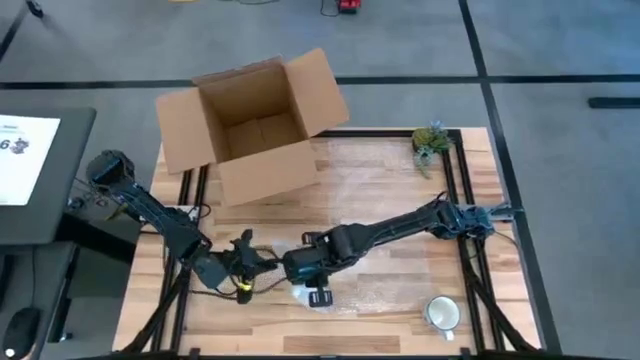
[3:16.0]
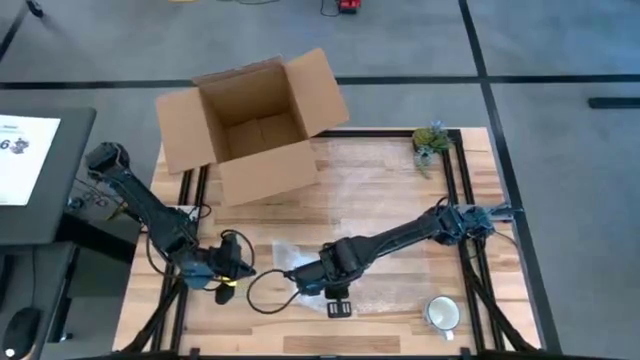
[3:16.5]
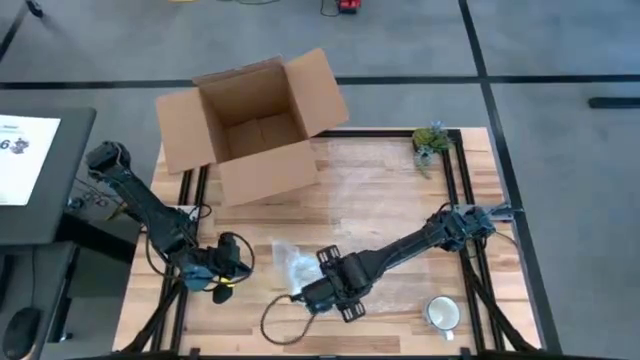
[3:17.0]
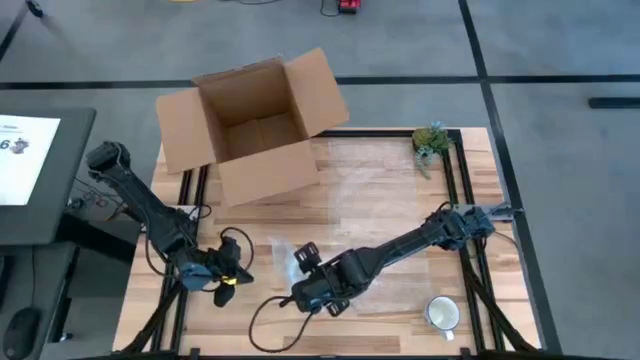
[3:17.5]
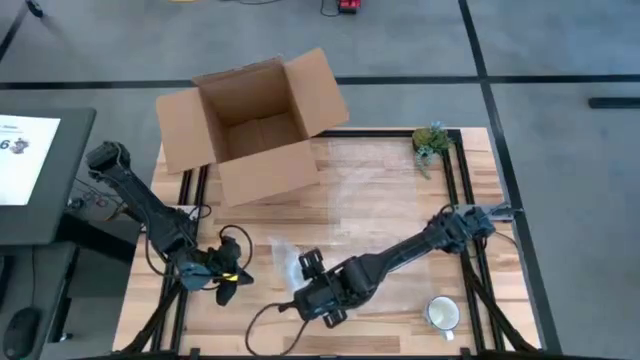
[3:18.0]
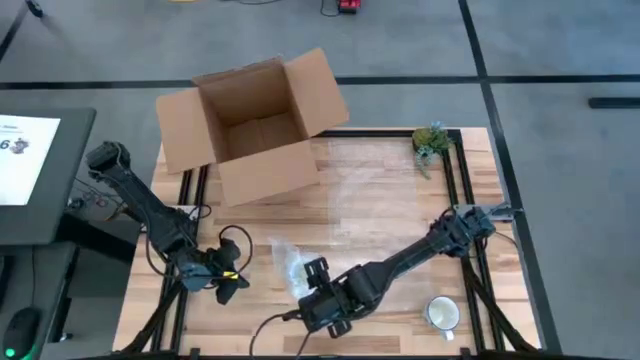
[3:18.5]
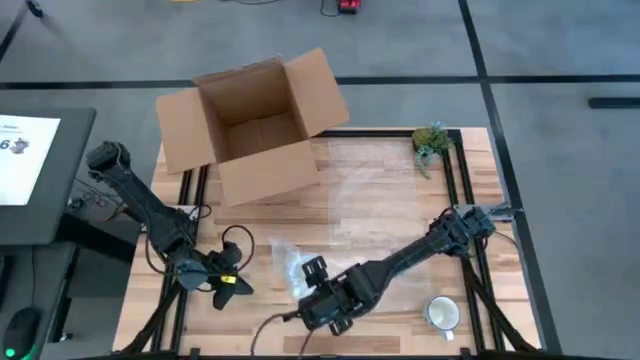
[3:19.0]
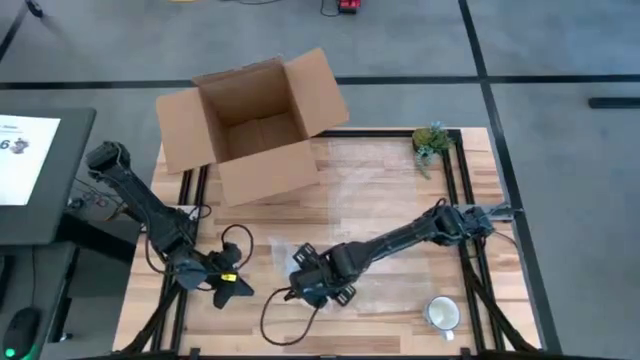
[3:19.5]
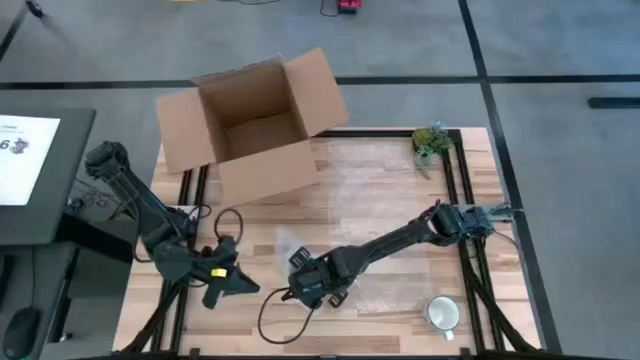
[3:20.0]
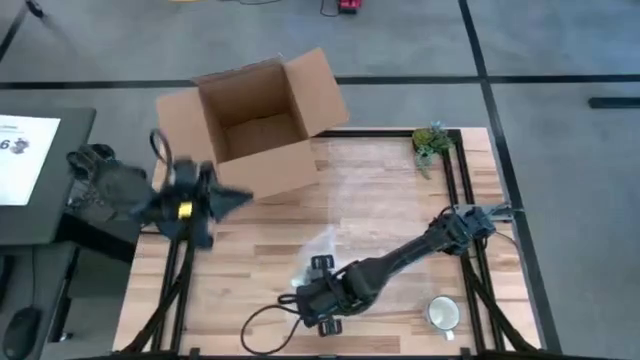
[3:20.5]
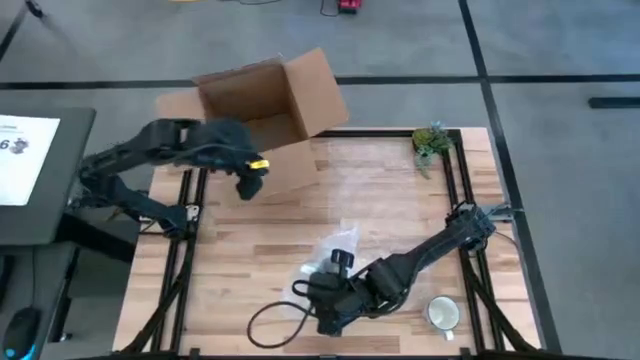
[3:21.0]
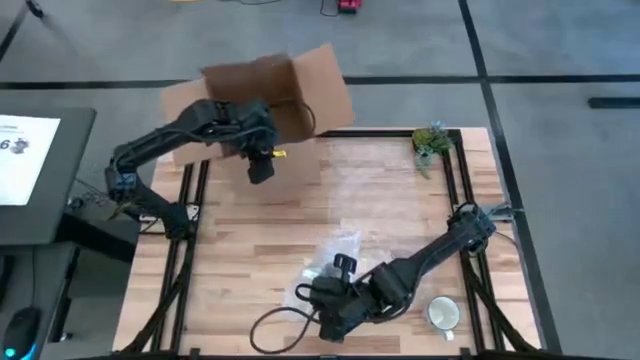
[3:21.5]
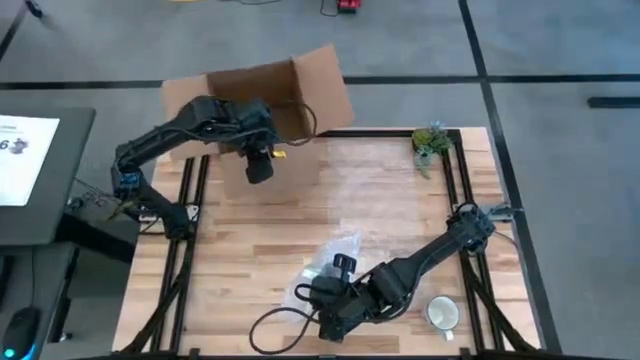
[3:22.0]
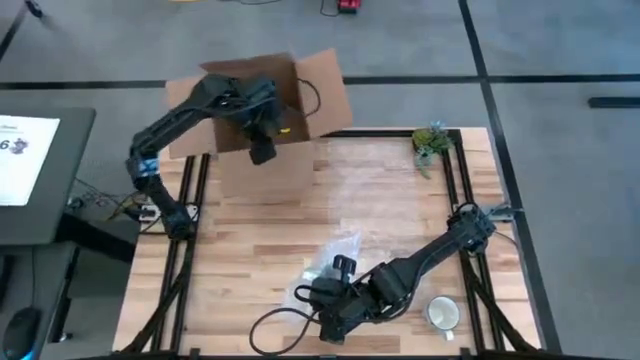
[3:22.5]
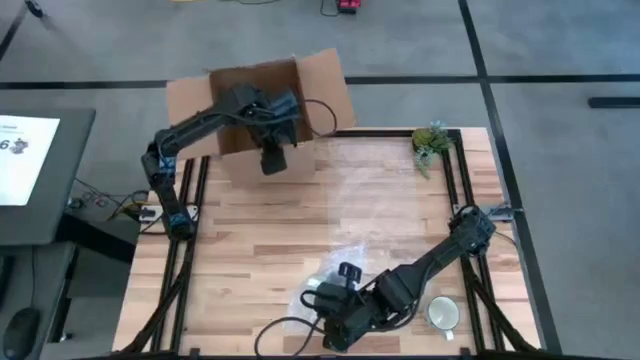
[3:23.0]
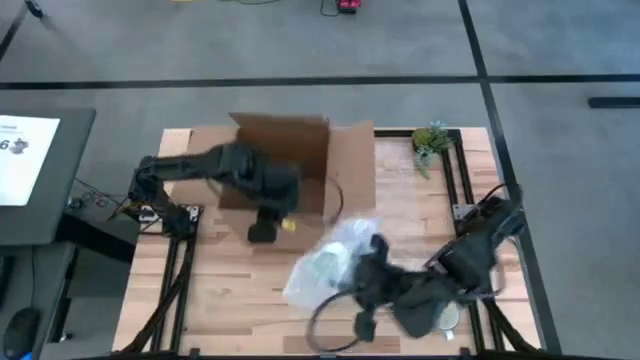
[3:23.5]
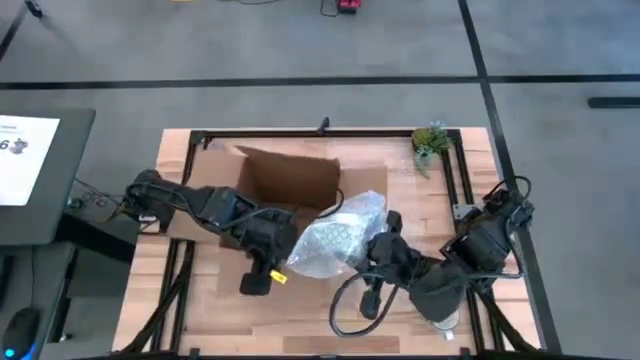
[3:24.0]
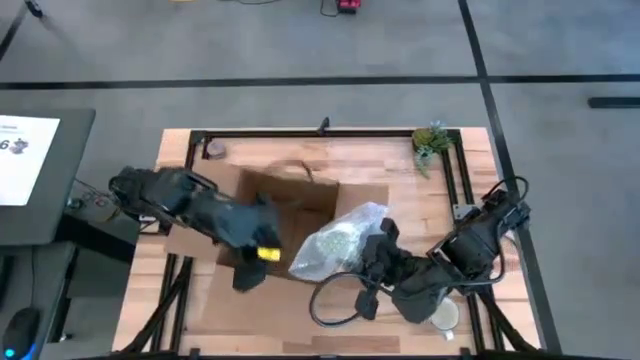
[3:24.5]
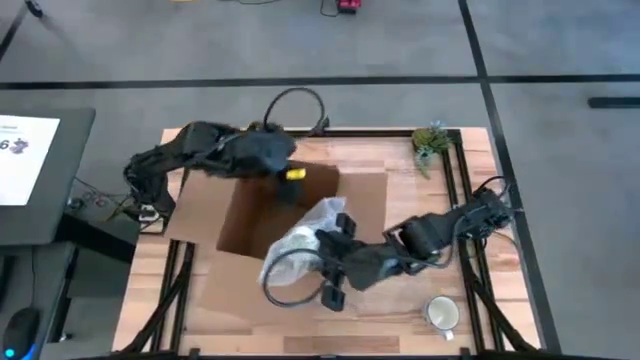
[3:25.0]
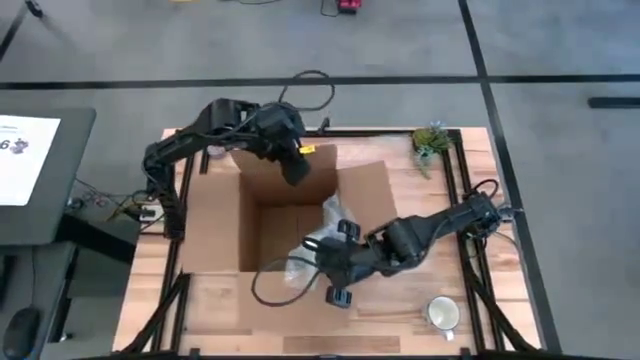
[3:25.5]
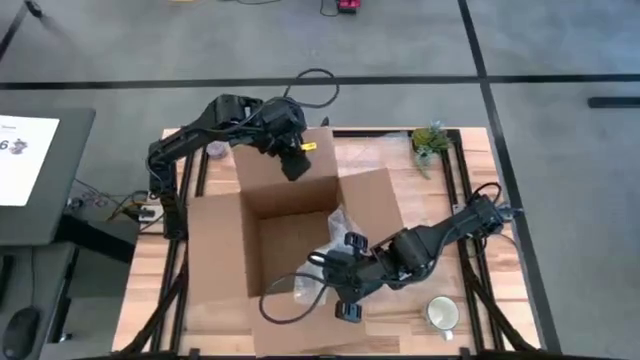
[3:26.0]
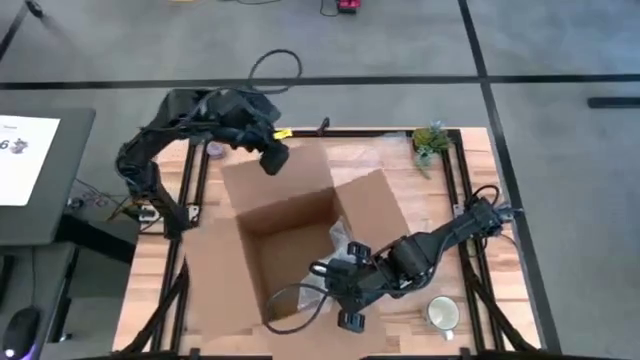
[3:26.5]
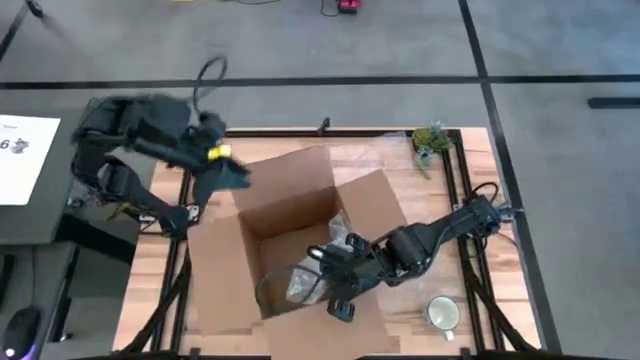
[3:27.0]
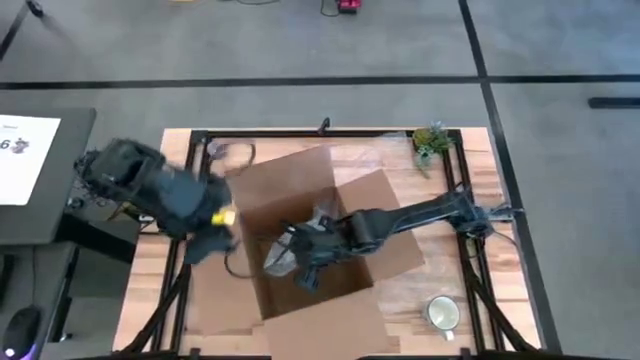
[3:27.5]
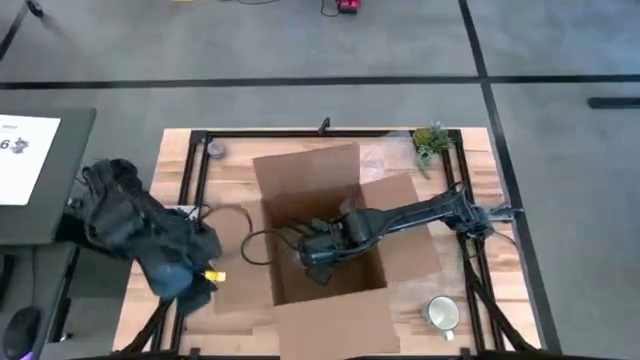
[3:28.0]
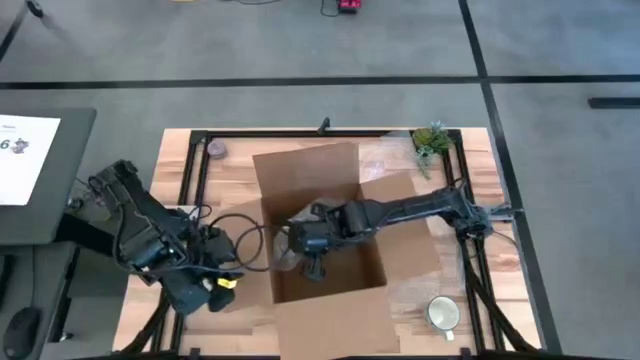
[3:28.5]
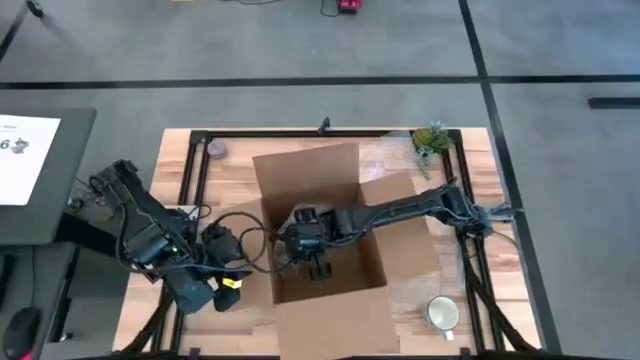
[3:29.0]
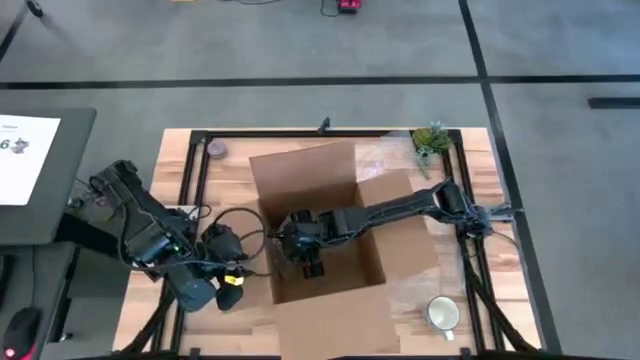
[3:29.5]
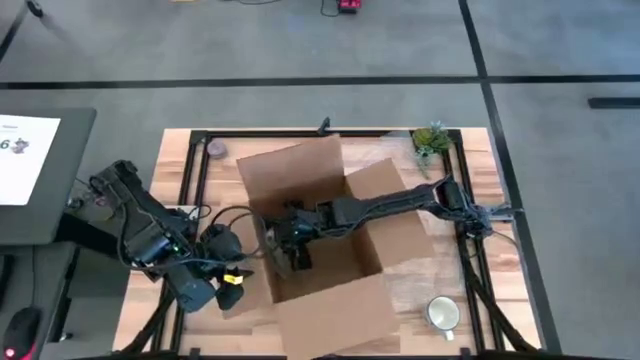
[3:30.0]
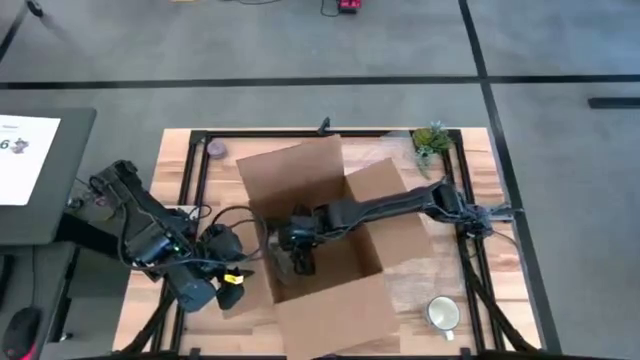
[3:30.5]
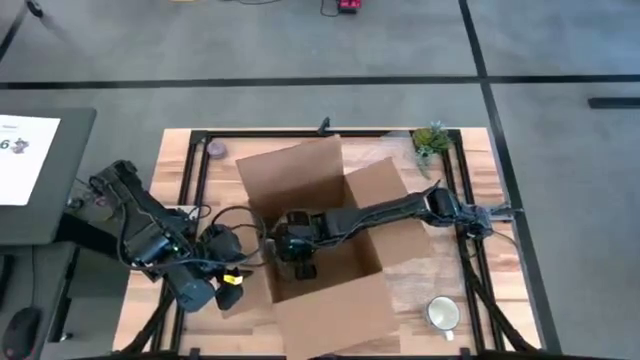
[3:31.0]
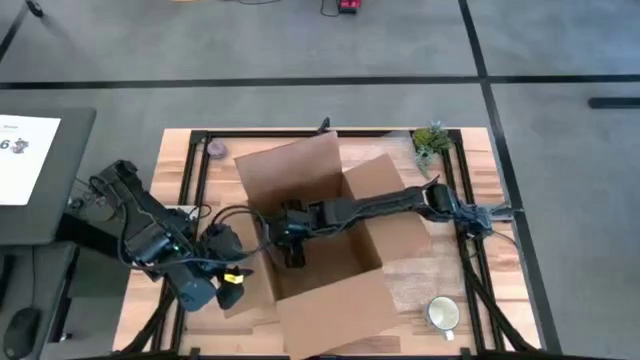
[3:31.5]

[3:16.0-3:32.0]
Task: wrap mug
Put the wrapped green patterned mug into the box

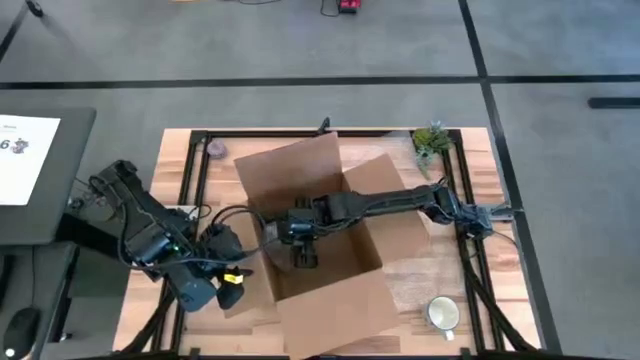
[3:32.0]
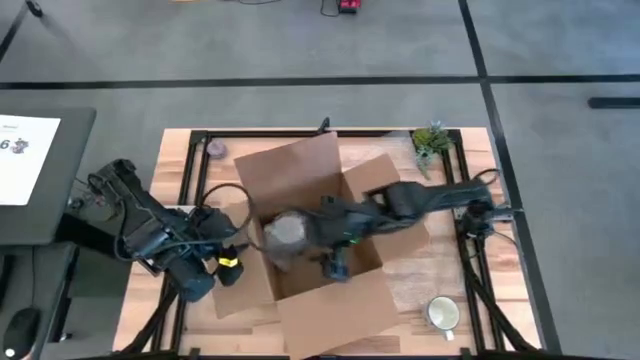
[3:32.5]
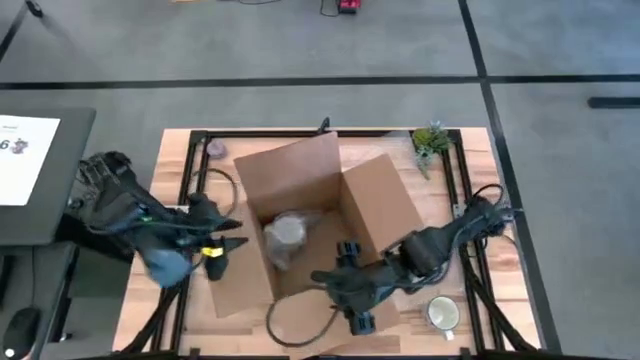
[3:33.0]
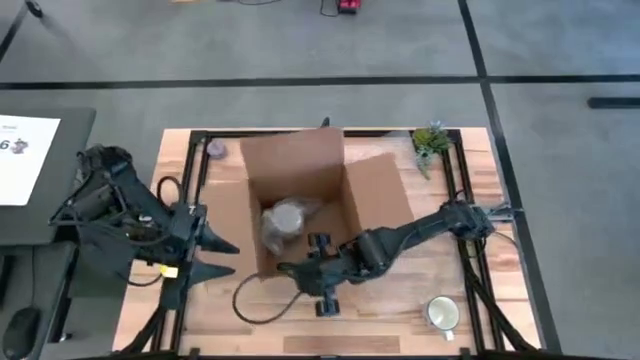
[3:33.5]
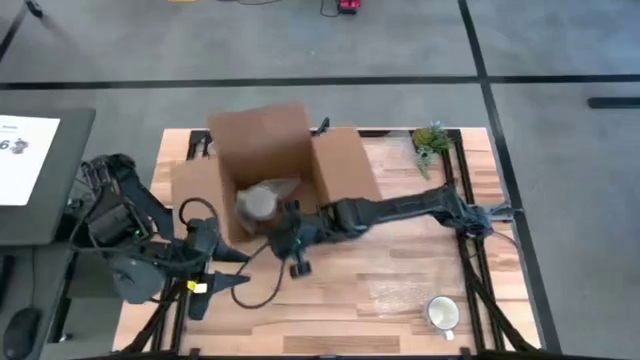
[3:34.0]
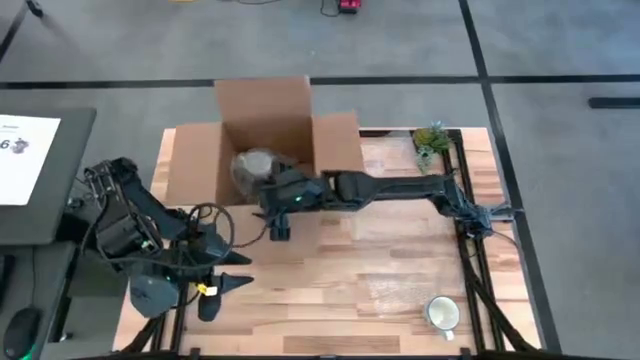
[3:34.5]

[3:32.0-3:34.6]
Move the box to the top left of the table

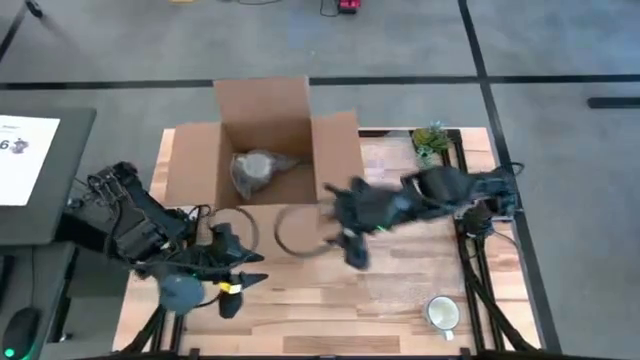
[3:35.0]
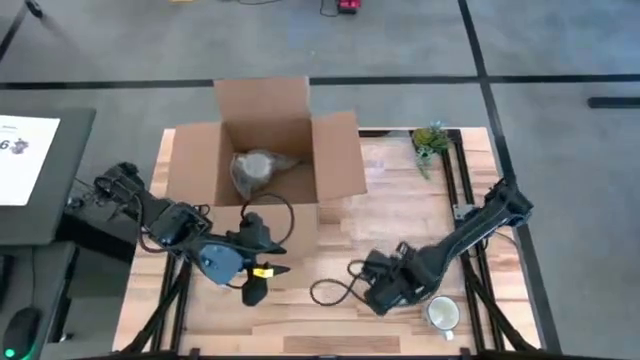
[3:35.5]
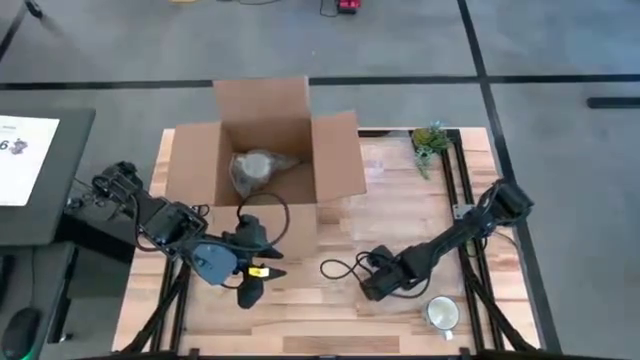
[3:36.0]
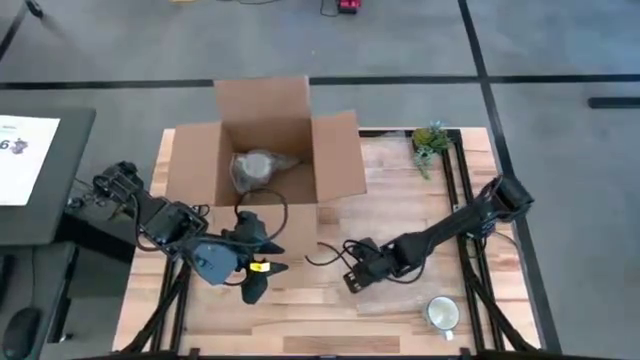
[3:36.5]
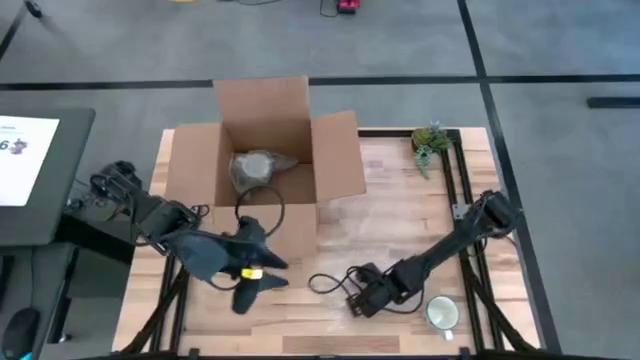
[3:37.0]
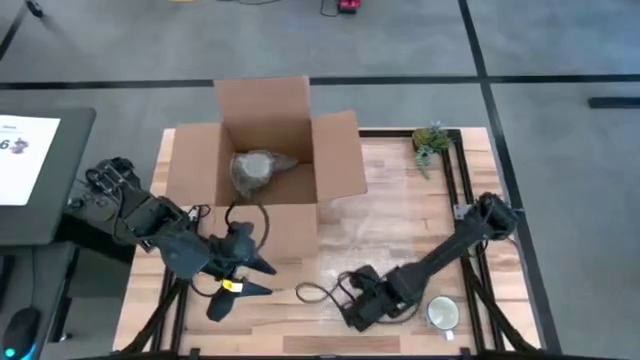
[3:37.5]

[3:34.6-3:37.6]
Prepare the bubble wrap
